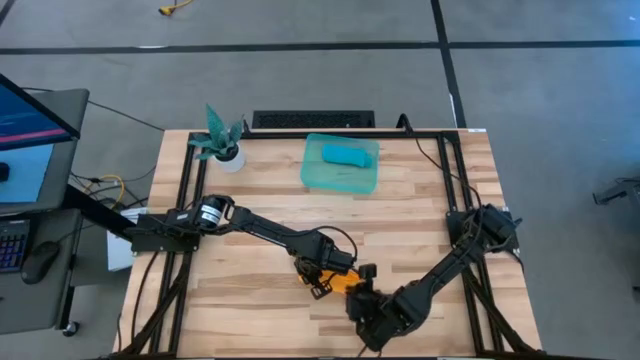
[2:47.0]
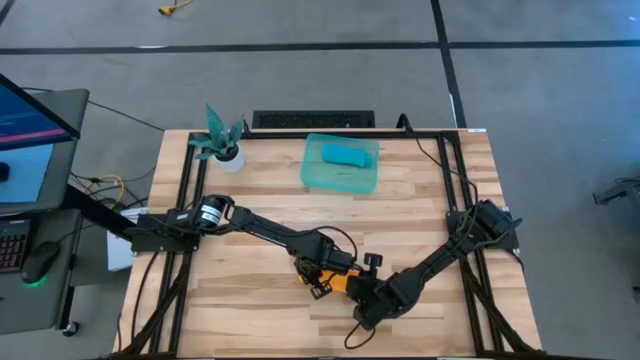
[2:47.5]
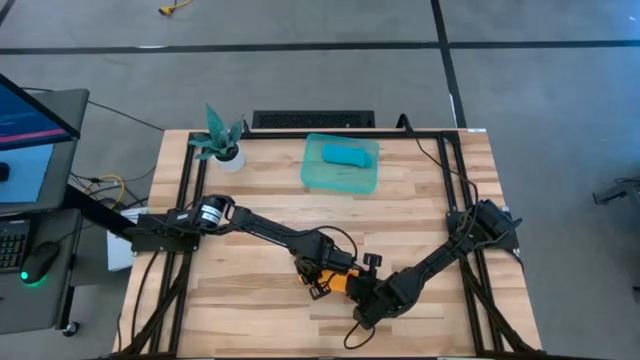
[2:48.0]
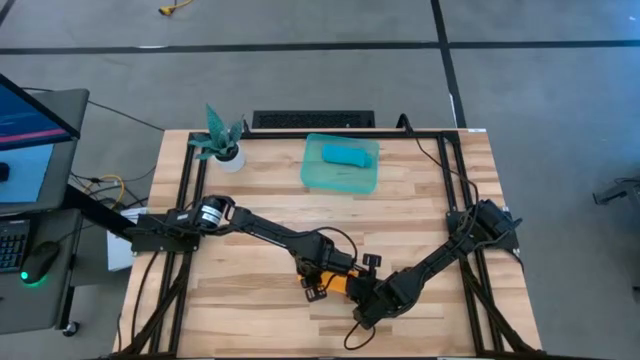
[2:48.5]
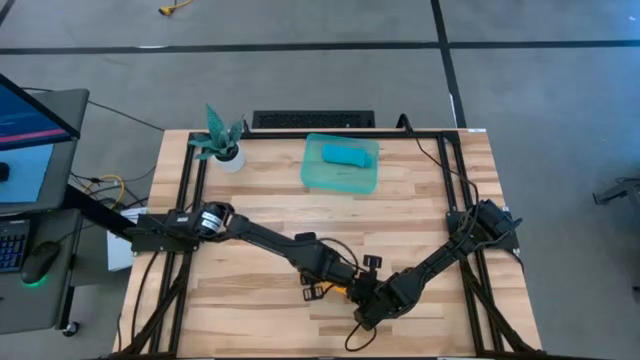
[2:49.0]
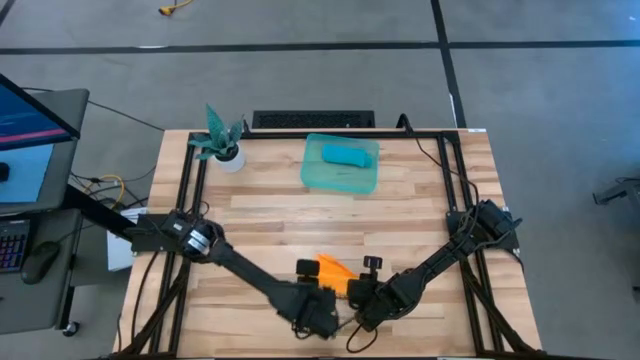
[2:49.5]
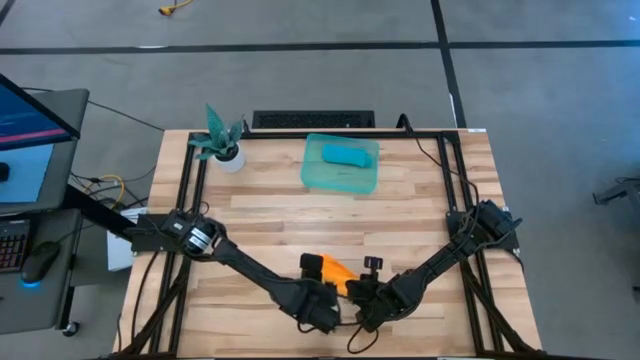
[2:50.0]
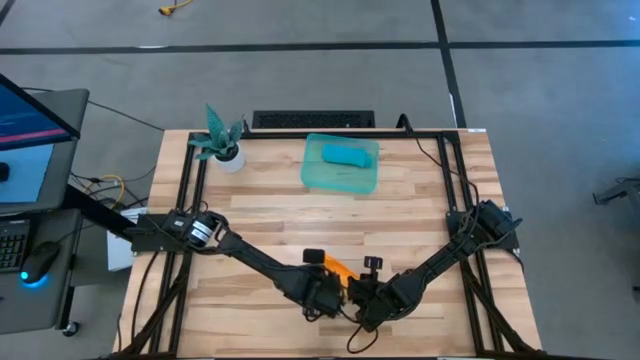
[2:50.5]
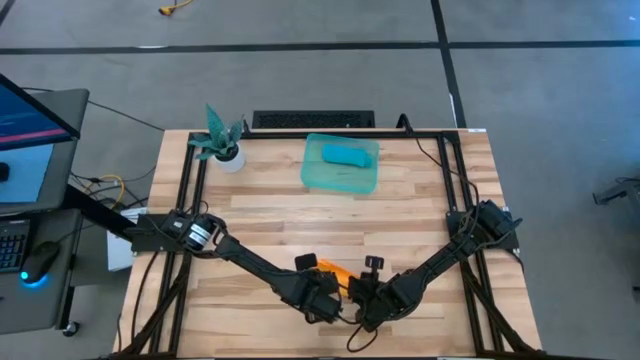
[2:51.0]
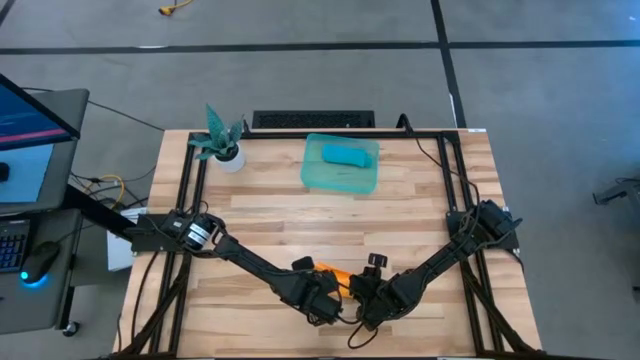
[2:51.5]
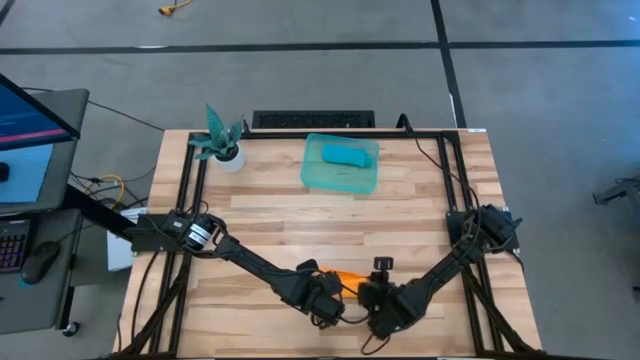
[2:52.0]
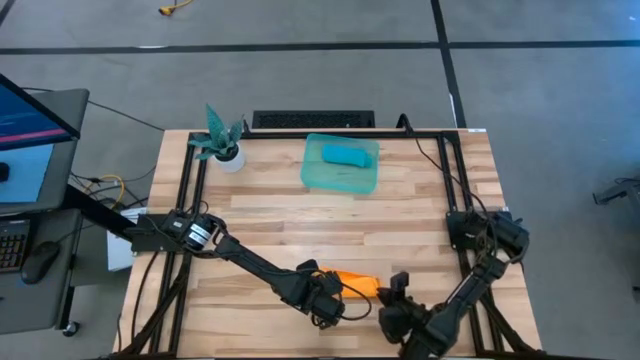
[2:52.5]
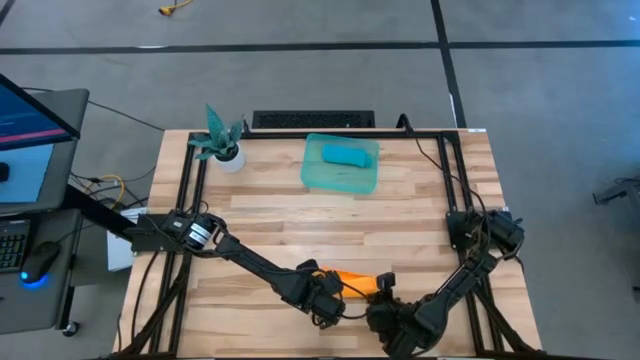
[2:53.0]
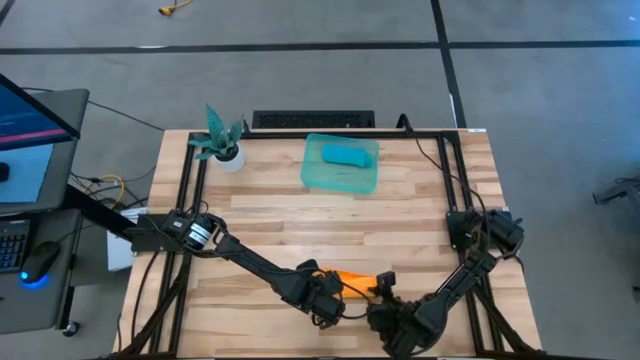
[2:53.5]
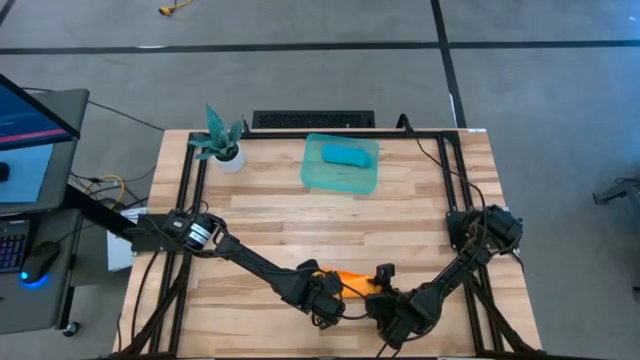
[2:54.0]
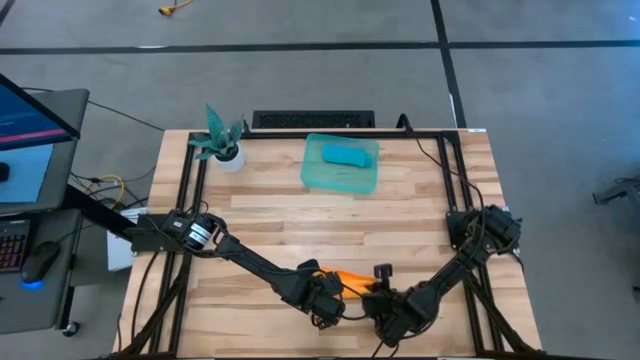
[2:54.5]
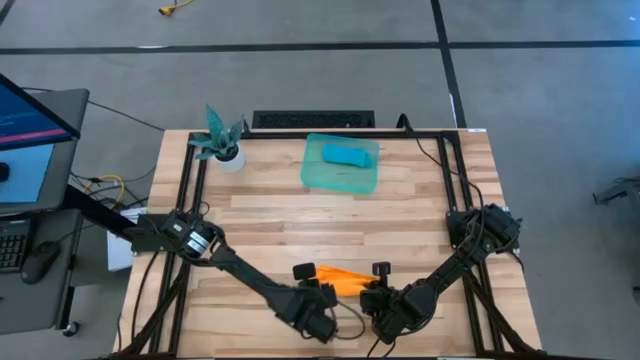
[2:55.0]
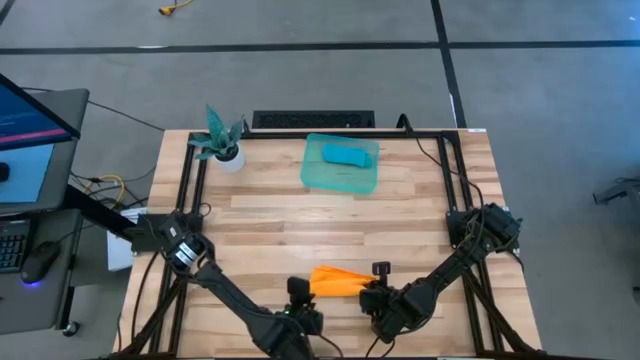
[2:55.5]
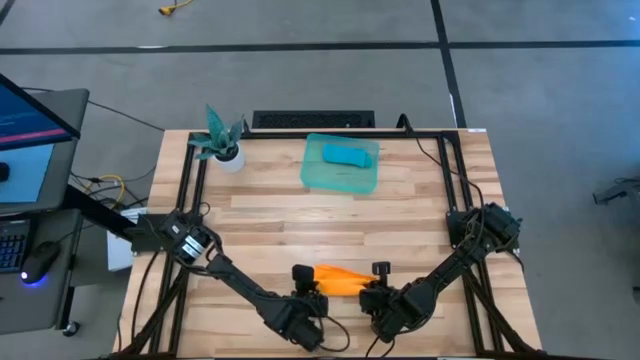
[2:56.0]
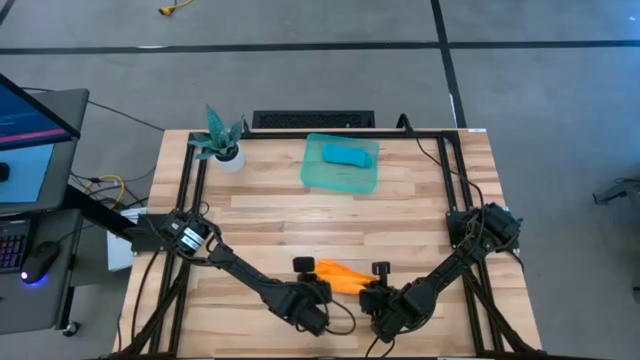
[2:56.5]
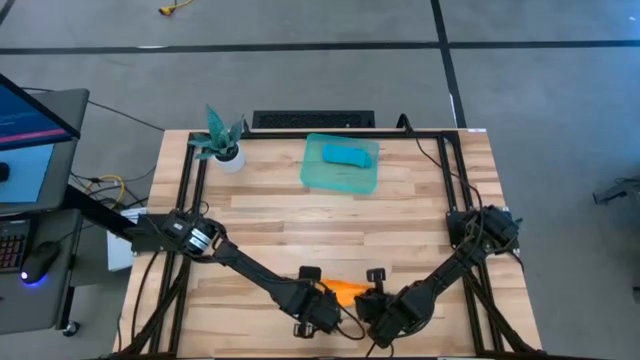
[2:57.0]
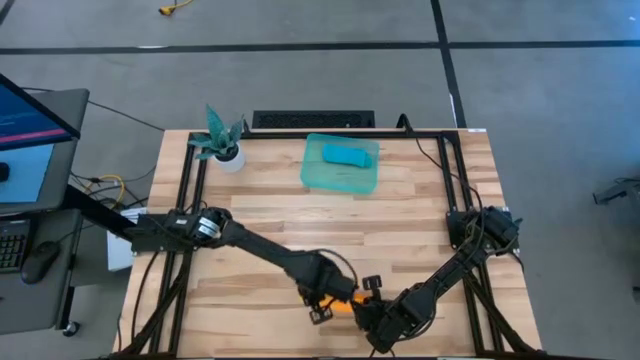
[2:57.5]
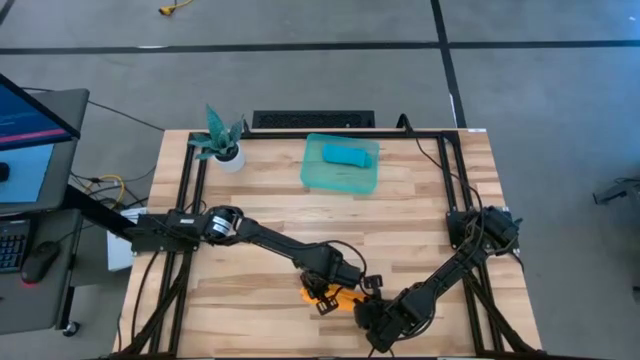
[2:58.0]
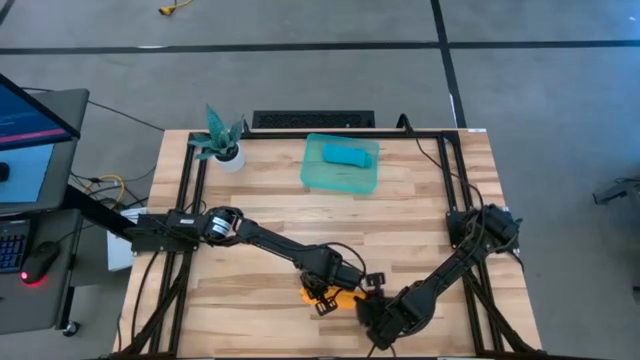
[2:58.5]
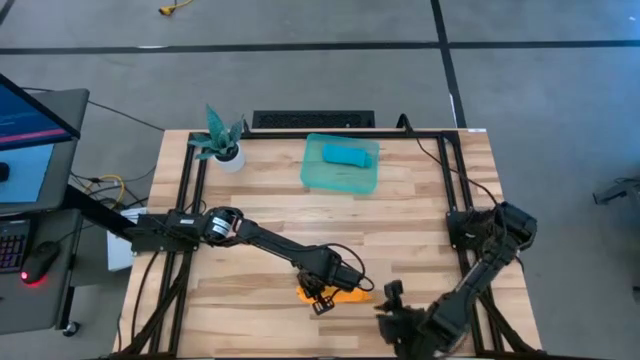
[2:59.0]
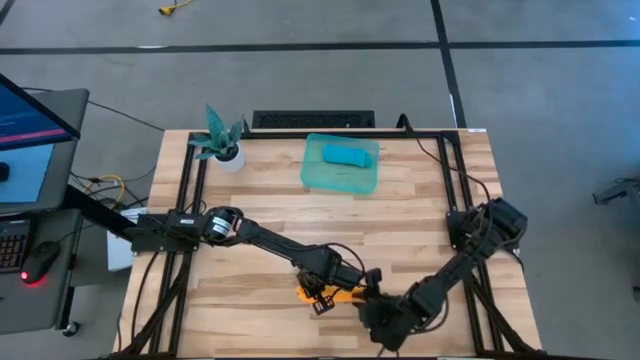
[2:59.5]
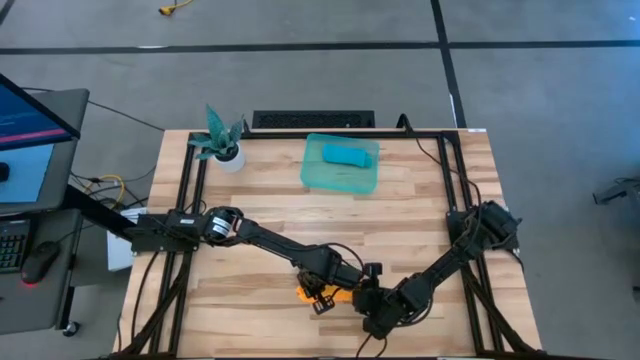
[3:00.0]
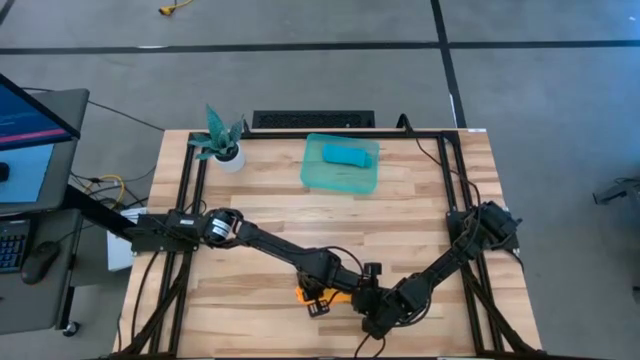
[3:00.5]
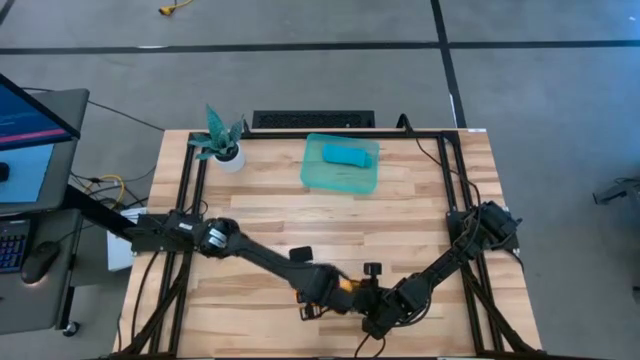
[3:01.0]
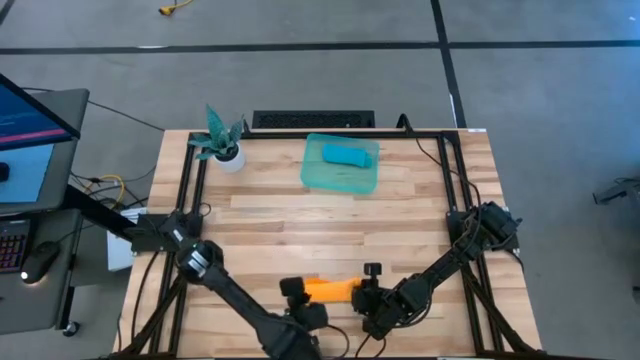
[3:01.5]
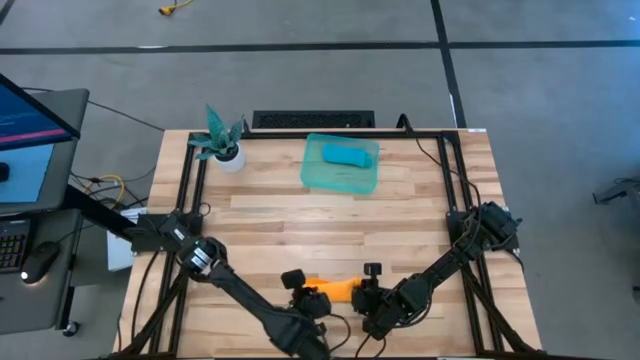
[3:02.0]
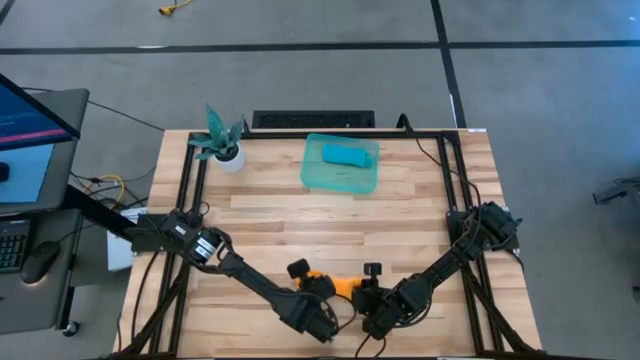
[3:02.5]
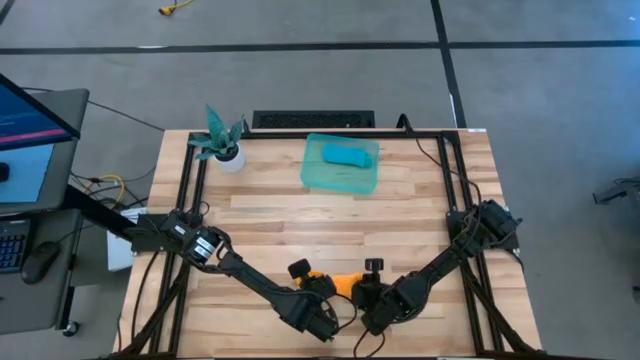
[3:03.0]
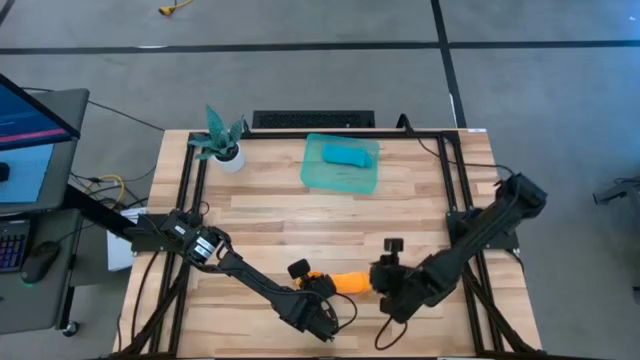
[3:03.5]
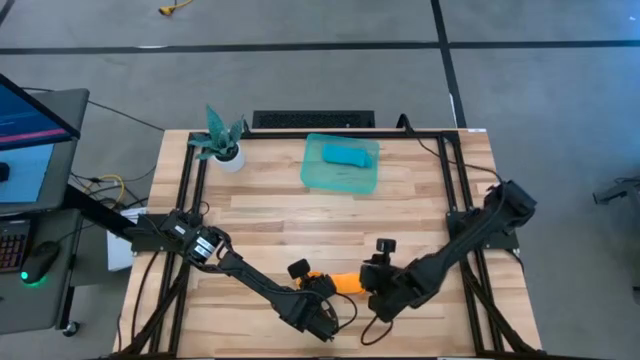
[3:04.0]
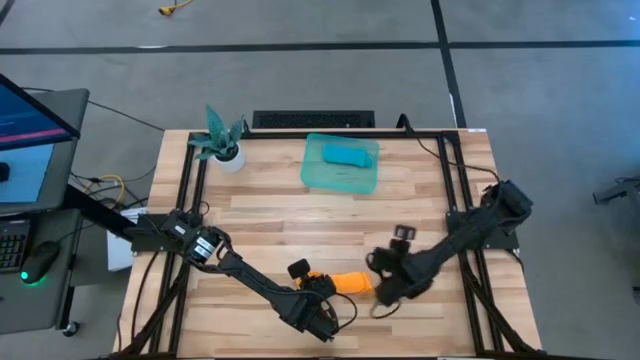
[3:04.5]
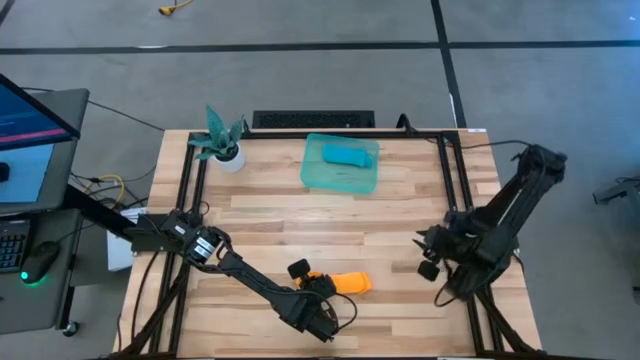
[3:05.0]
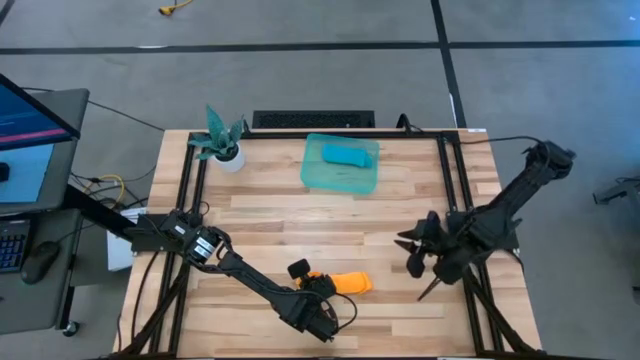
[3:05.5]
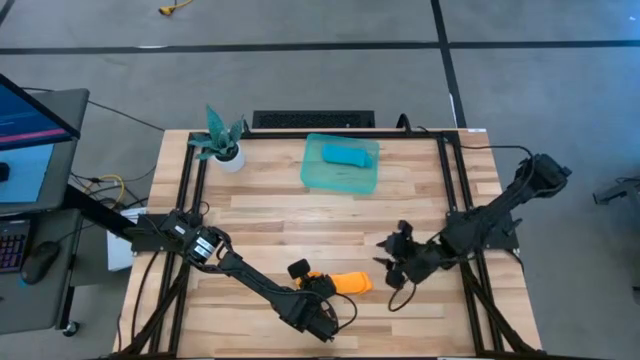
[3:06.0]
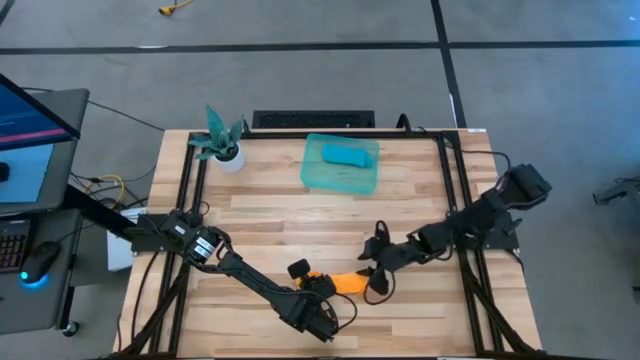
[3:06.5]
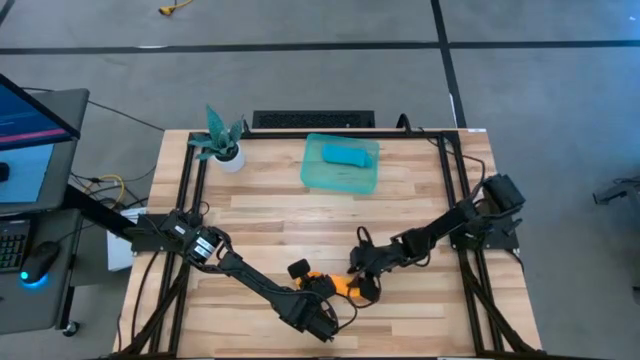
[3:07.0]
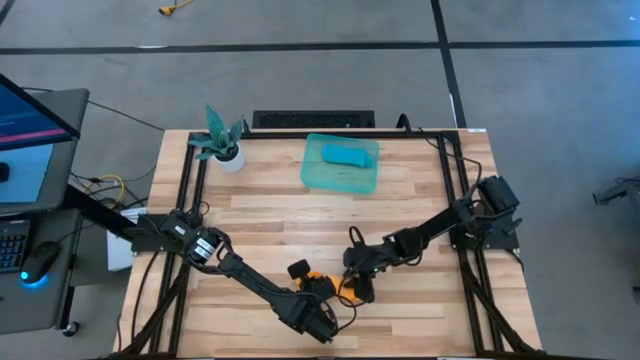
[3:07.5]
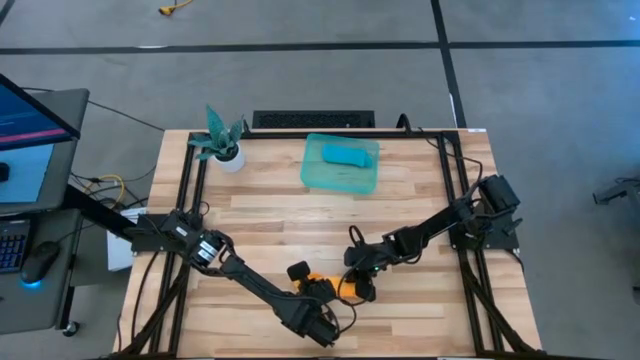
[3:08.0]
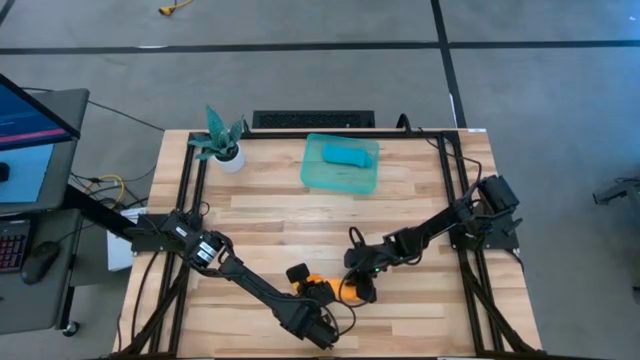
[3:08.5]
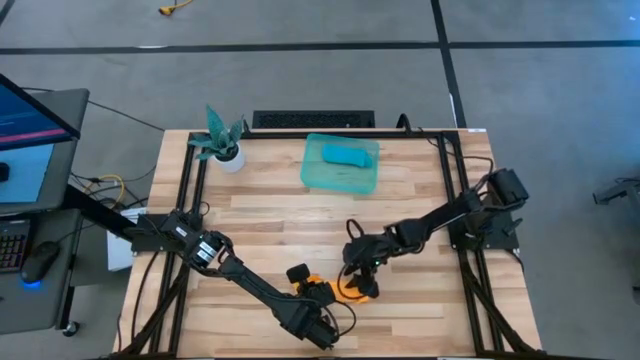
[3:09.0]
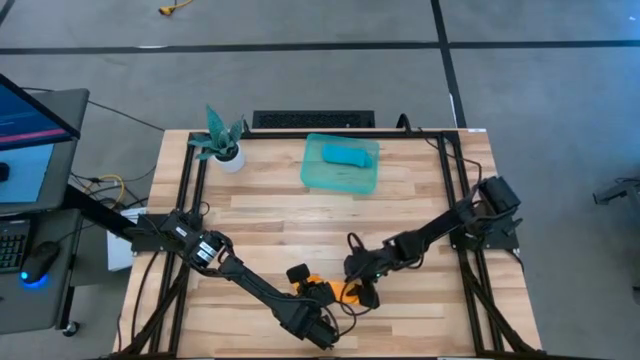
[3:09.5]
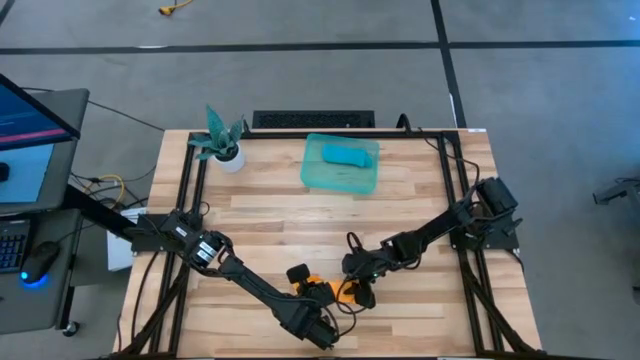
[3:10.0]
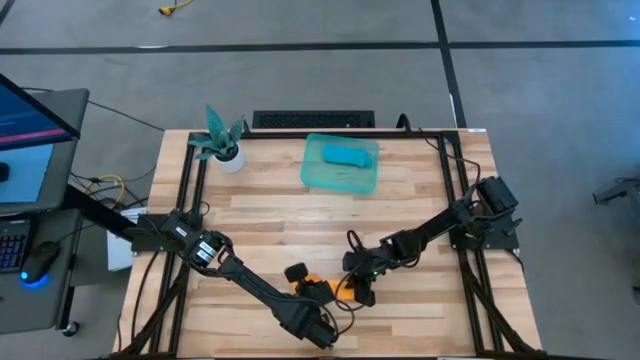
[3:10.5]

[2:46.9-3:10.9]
Task: Roll microfiber towels into tight, uniform cylinder then place into a basket
Roll the yellow microfiber towel
